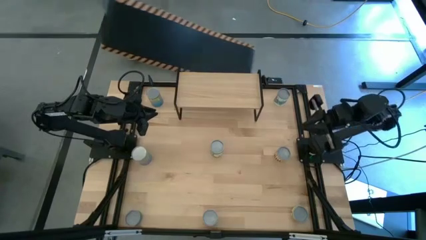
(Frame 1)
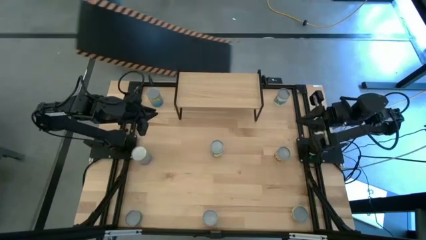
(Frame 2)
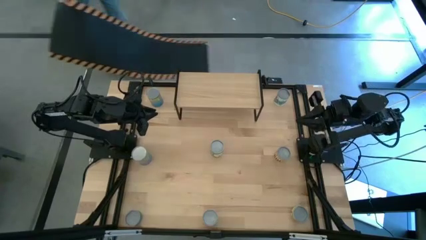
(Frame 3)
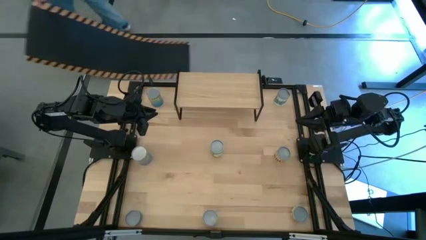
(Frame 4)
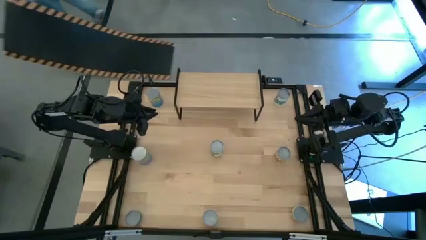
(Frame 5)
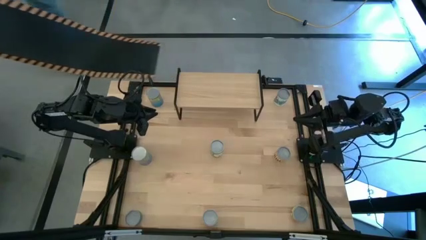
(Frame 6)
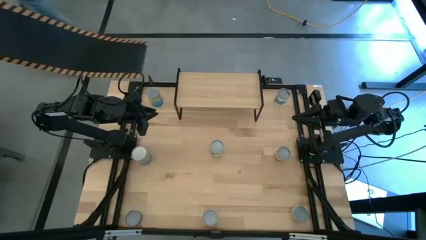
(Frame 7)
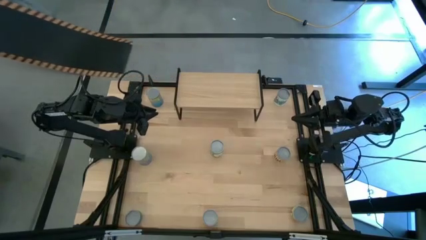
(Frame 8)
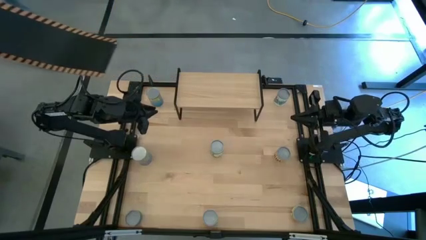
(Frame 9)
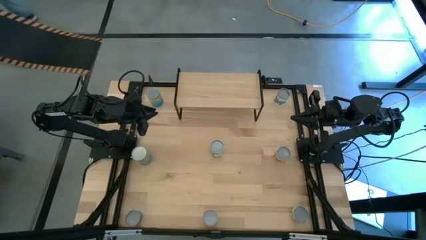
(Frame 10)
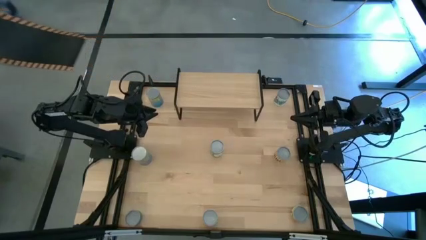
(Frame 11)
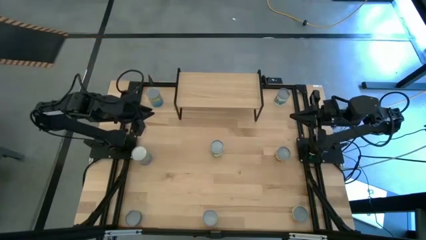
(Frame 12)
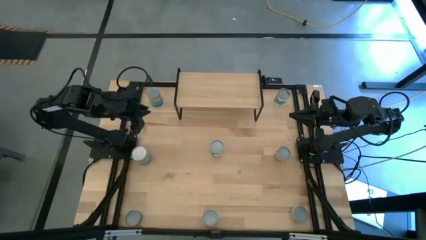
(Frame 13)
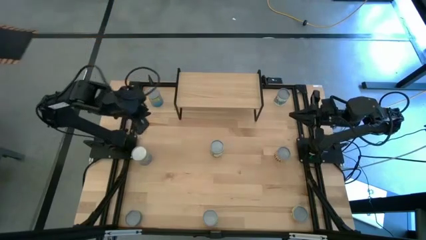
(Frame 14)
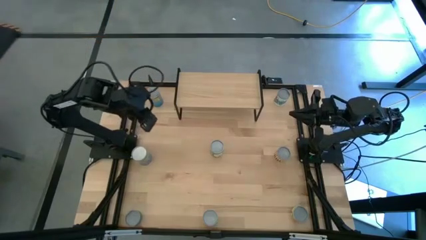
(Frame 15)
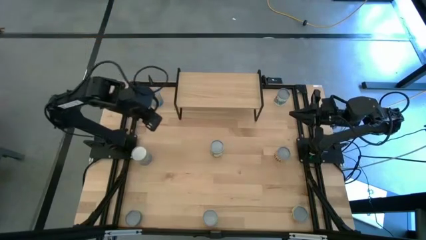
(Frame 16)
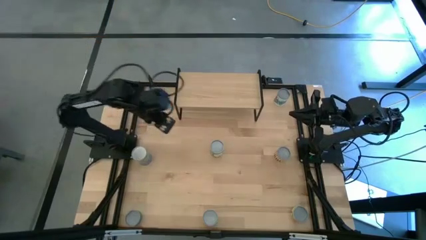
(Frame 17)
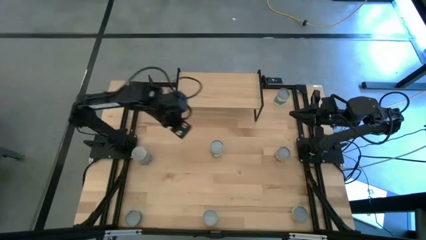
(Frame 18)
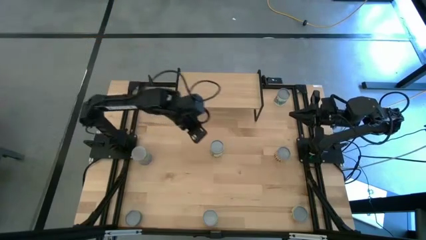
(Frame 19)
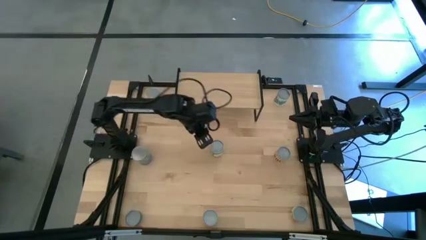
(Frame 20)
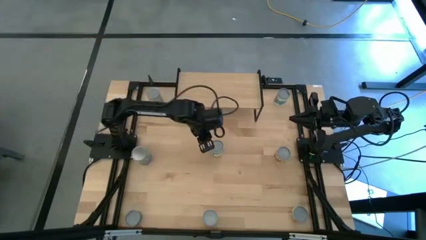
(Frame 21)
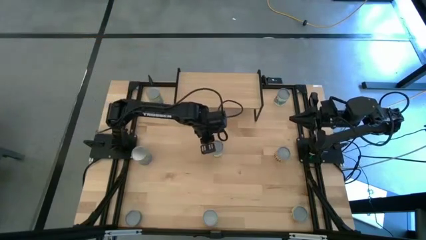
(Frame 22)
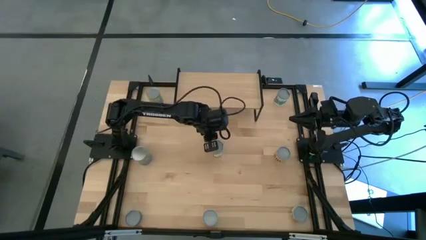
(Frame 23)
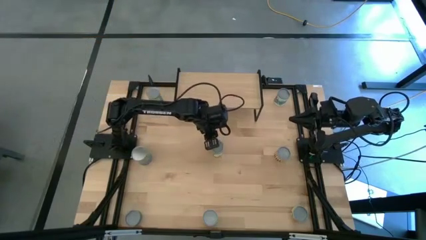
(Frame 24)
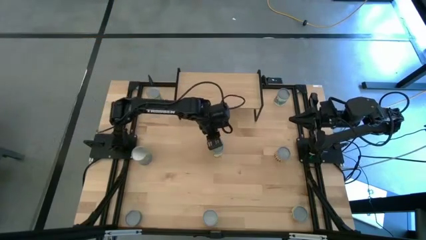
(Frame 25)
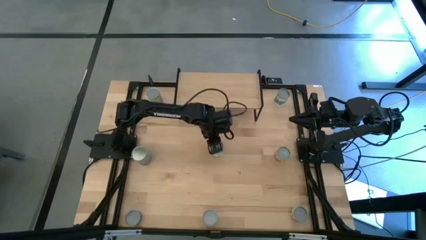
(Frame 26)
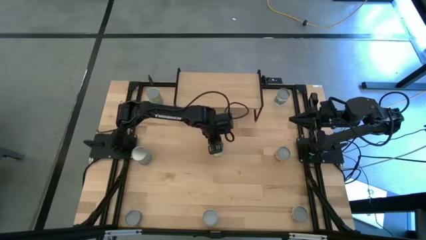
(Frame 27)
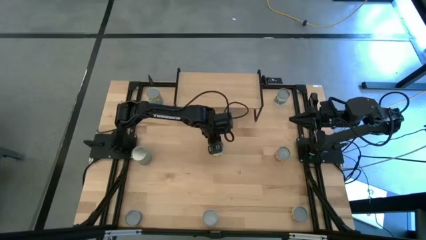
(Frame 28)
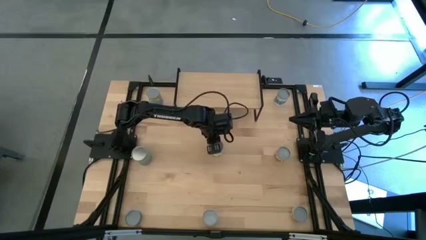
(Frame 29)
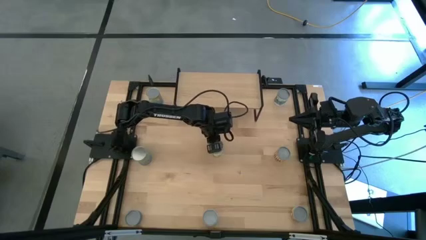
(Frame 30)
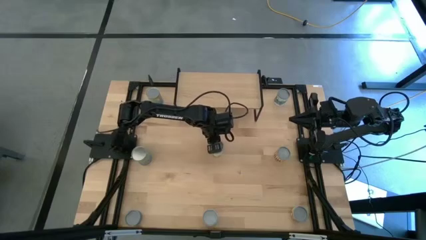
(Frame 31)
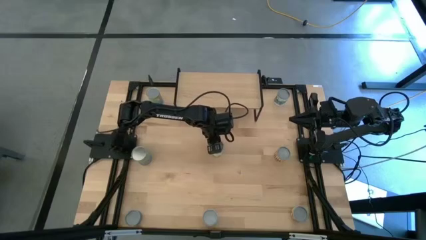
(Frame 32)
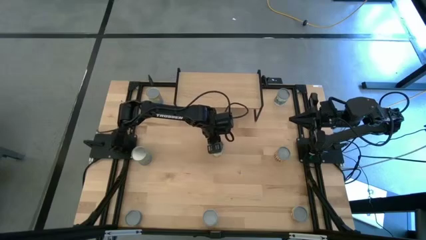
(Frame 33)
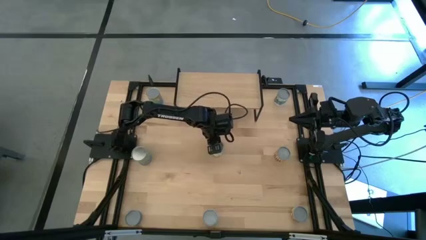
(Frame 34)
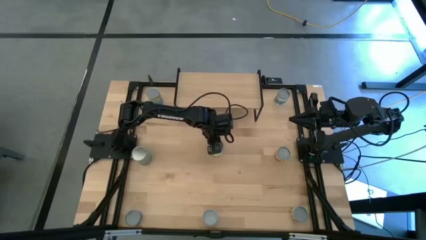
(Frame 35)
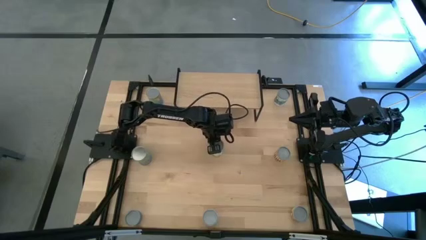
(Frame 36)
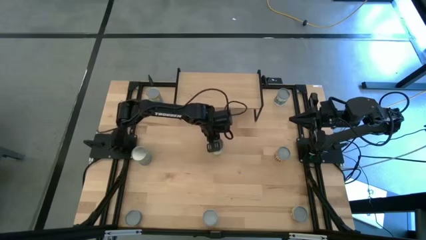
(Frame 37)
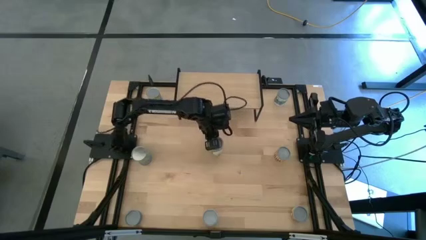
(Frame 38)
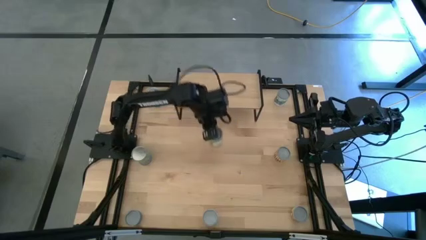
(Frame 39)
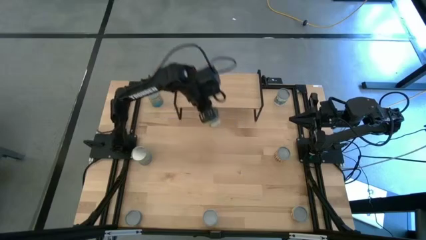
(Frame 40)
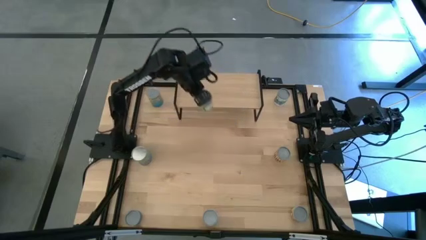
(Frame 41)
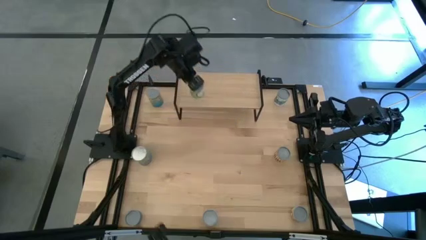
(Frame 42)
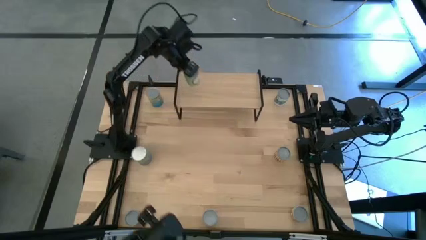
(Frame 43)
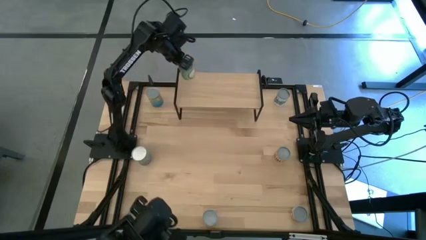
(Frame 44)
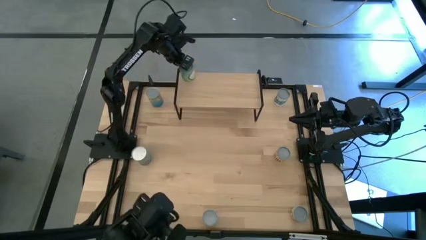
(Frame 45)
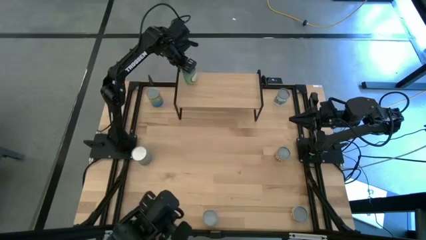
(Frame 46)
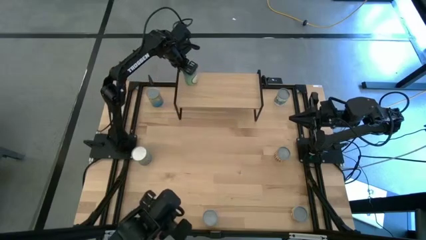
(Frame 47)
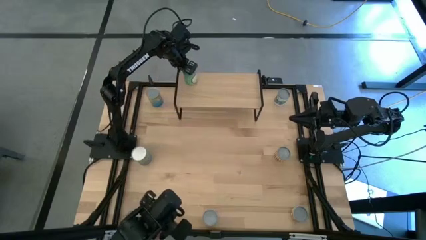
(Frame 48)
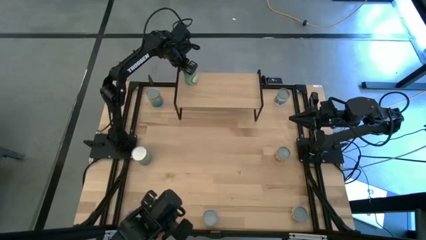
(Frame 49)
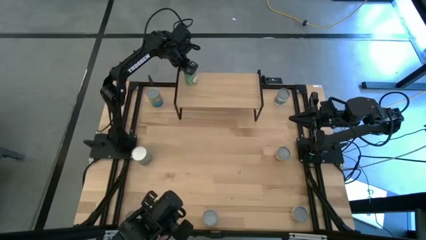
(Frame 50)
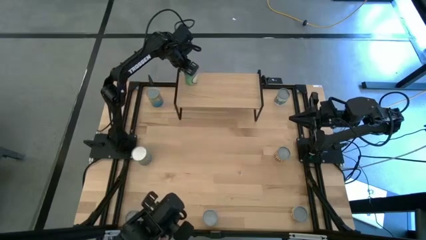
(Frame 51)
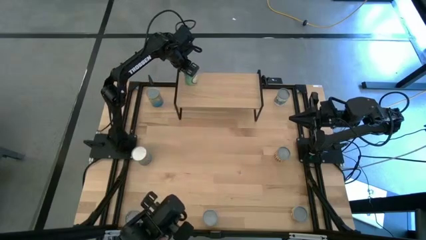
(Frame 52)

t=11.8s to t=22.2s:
Task: Pick and place cans onto a shelf
Put the canned chicken soup on the shelf

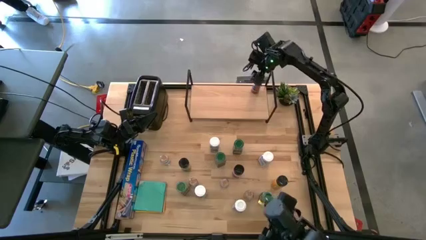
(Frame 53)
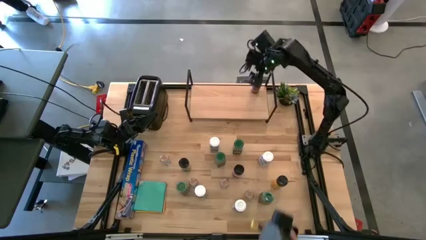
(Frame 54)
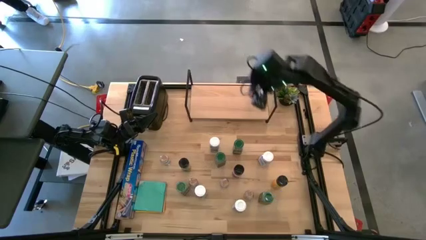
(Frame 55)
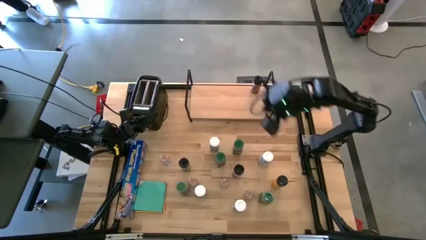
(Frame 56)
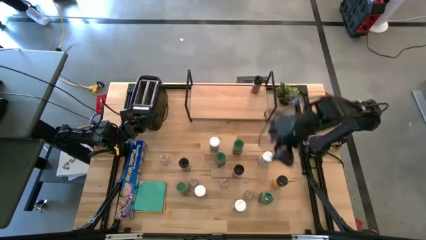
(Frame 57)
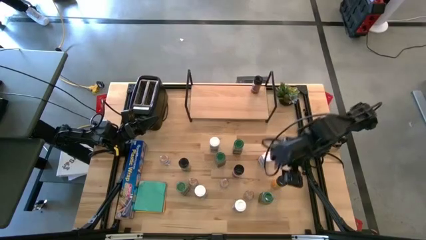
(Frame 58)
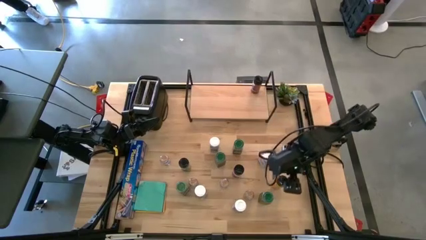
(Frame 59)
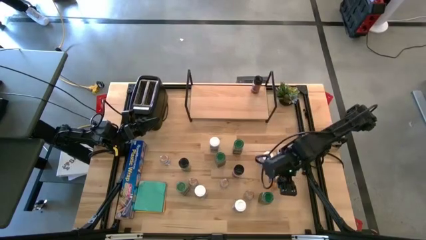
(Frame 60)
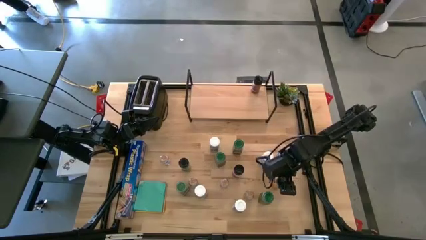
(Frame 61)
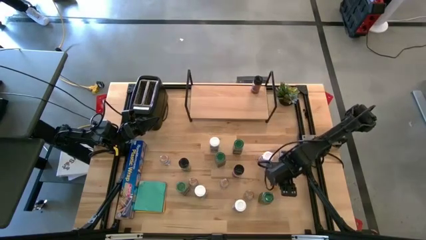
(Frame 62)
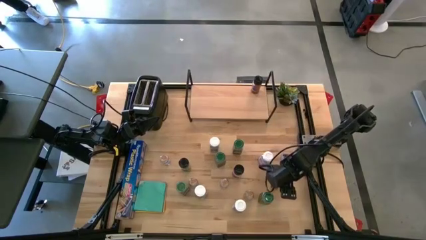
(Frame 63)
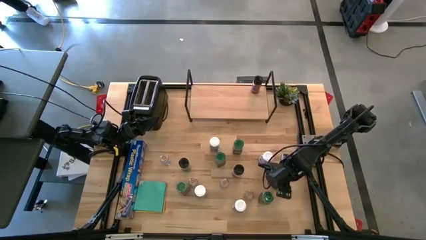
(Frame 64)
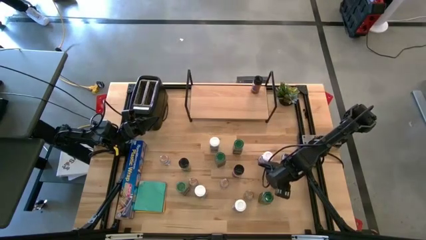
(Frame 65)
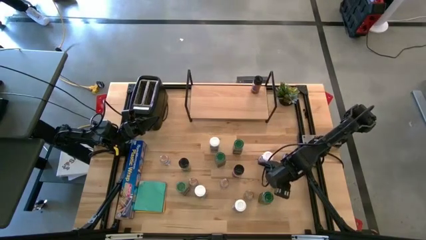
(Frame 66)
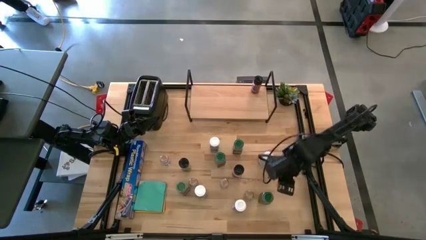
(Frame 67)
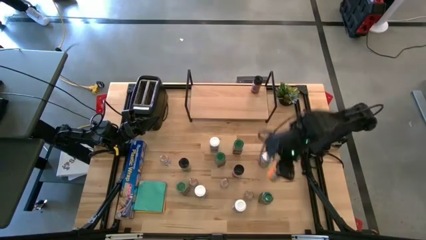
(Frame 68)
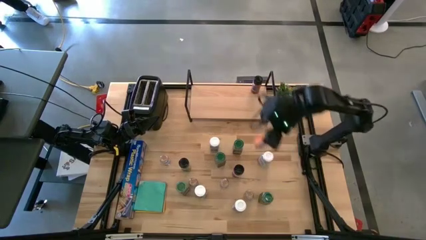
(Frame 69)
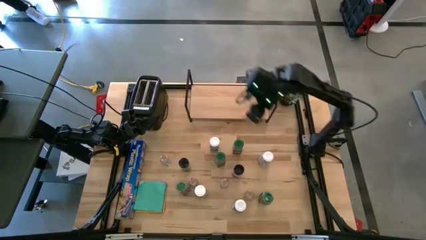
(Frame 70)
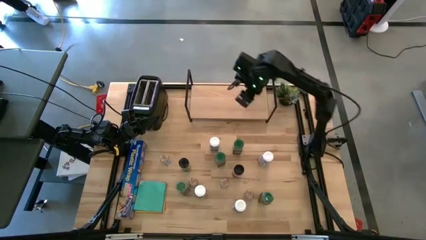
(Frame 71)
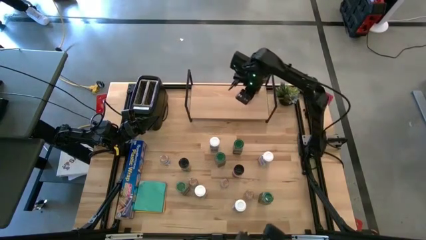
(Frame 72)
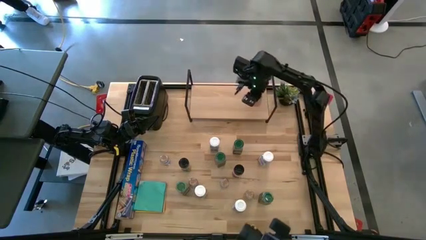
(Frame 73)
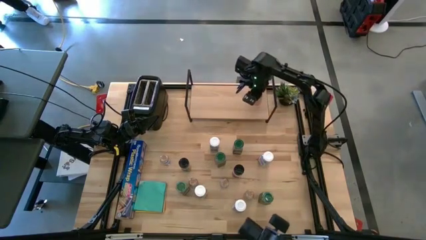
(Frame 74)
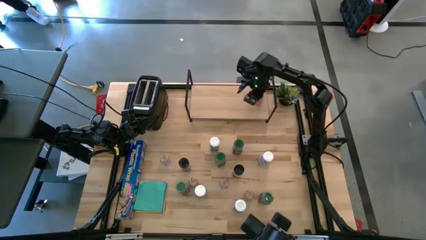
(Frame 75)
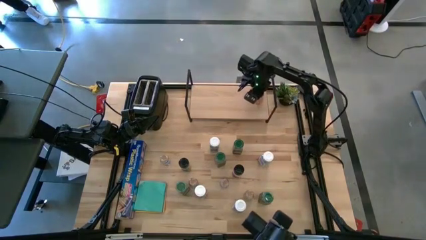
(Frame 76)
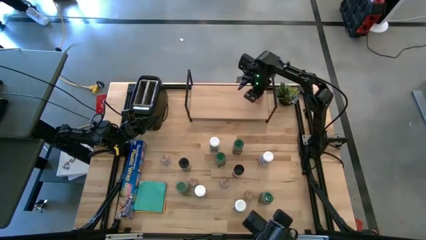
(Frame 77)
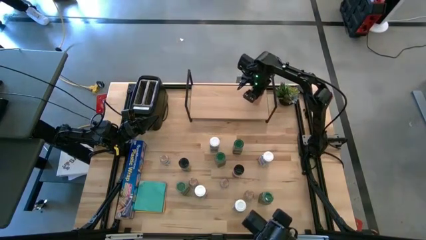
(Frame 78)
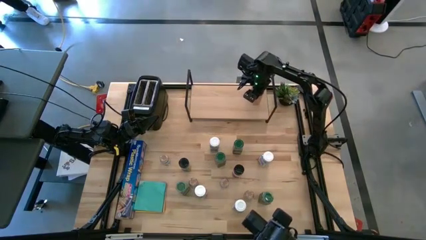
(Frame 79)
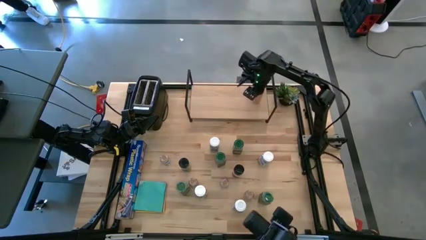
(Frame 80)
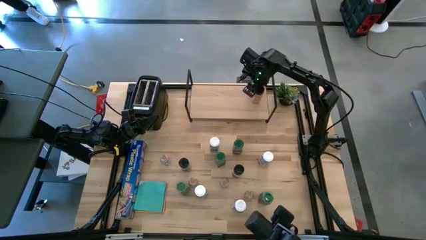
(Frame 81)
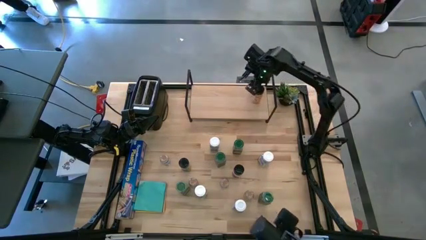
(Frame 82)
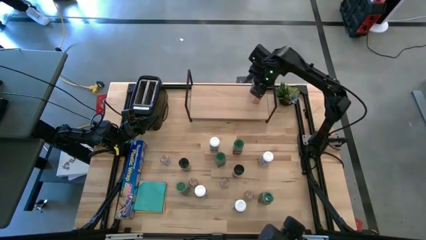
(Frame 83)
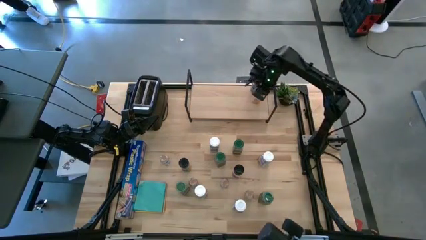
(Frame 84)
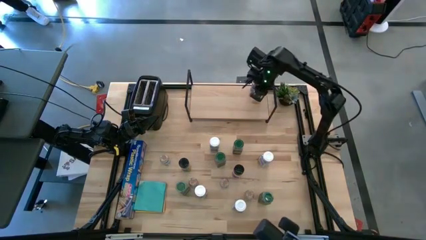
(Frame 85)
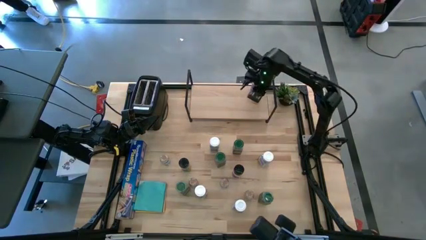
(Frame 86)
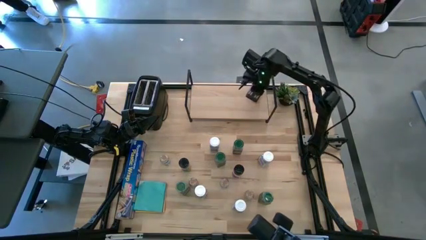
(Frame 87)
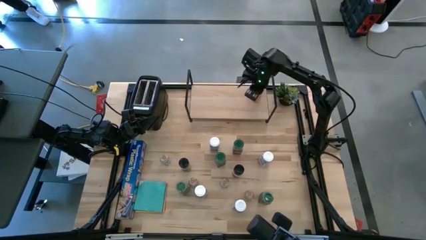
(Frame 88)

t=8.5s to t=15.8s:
Task: Shelf spices
Put the right black spice bottle on the shelf and align with the other black spice bottle
